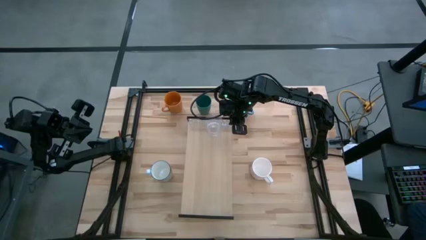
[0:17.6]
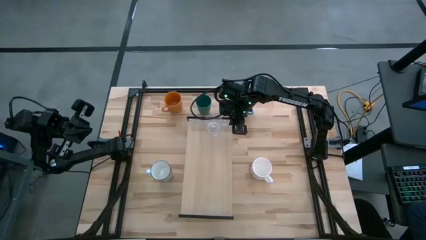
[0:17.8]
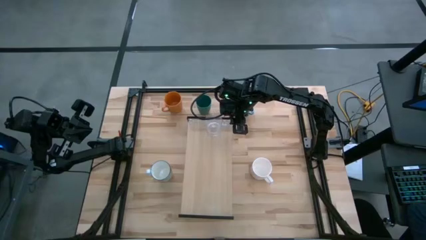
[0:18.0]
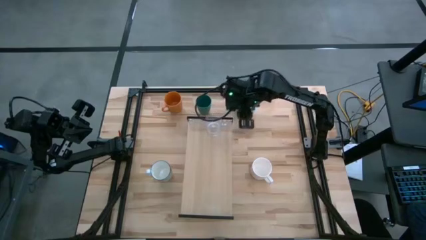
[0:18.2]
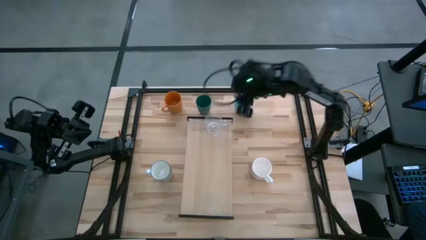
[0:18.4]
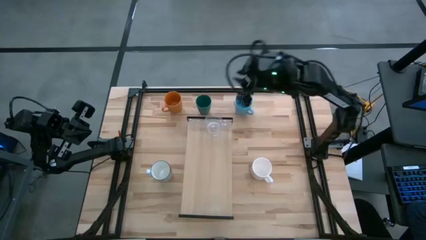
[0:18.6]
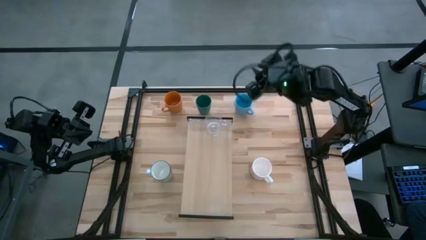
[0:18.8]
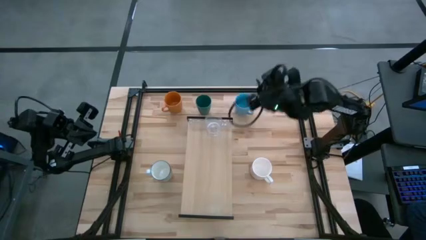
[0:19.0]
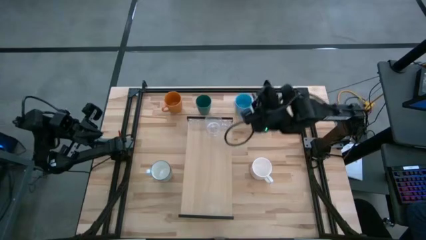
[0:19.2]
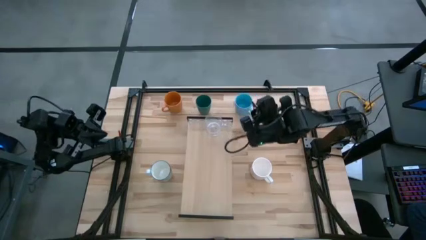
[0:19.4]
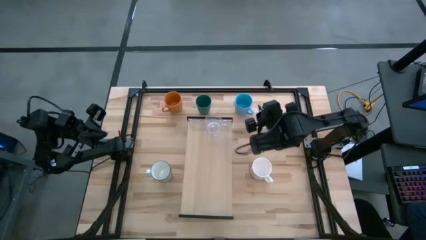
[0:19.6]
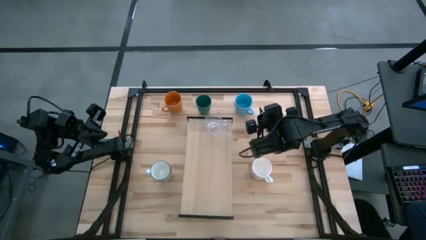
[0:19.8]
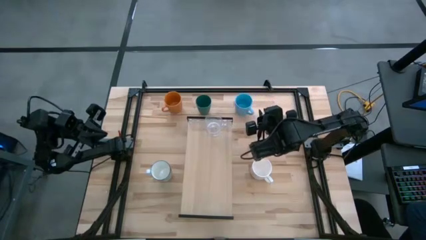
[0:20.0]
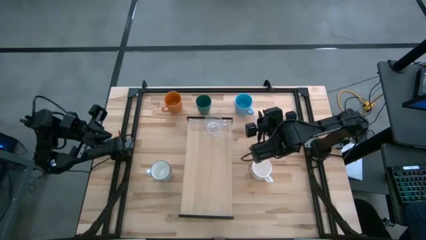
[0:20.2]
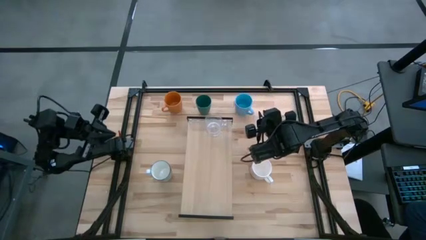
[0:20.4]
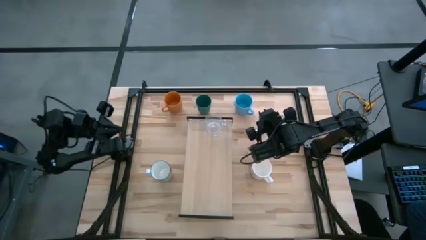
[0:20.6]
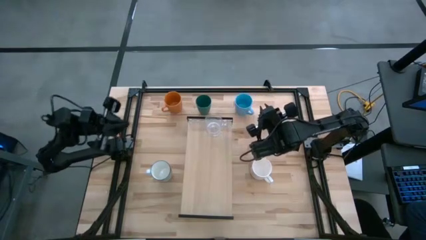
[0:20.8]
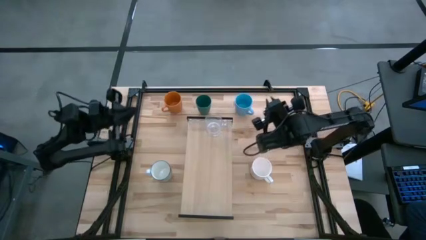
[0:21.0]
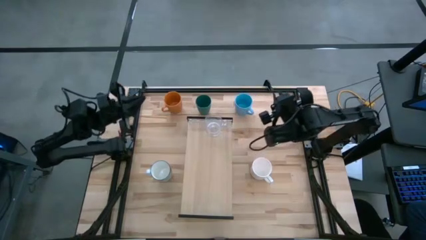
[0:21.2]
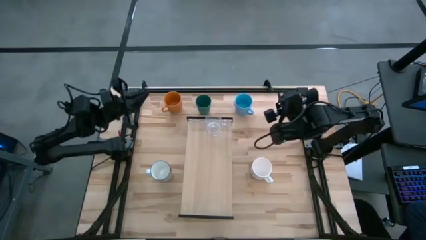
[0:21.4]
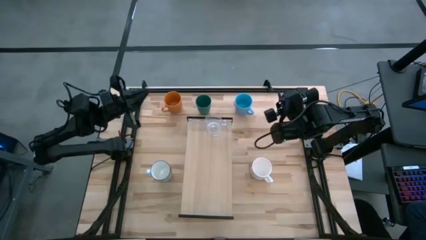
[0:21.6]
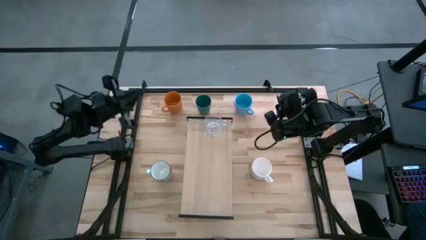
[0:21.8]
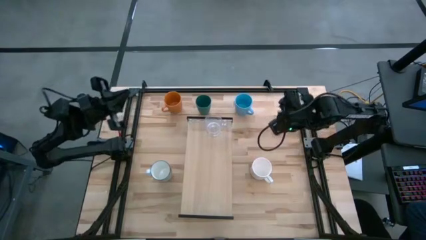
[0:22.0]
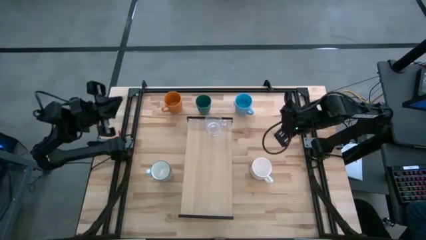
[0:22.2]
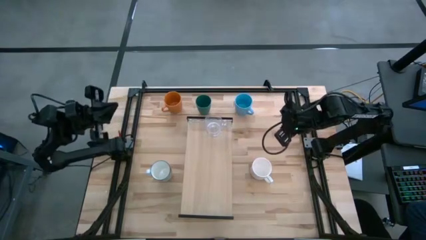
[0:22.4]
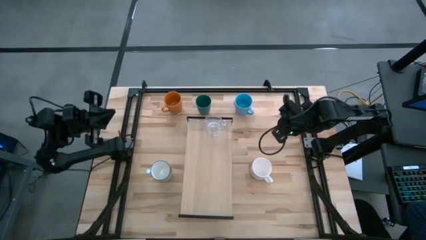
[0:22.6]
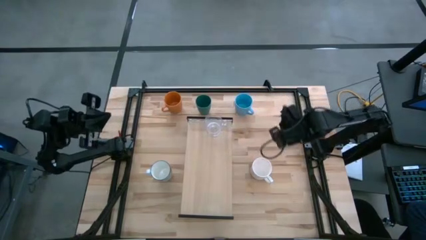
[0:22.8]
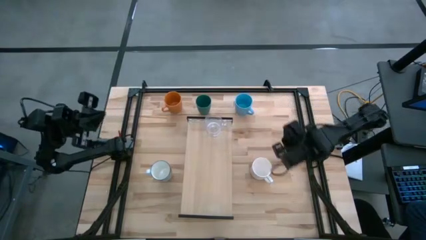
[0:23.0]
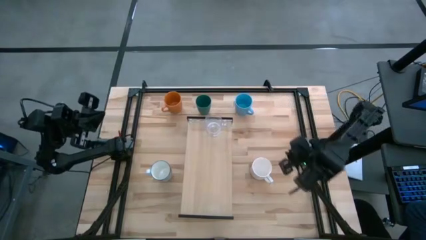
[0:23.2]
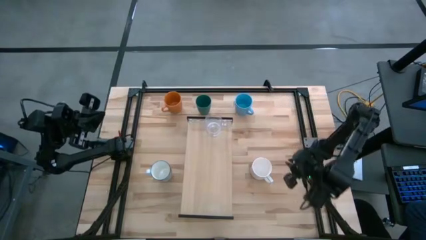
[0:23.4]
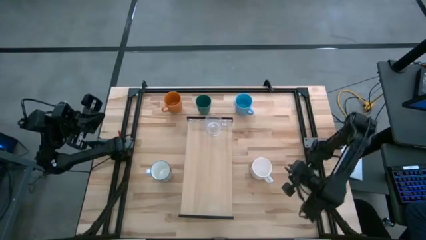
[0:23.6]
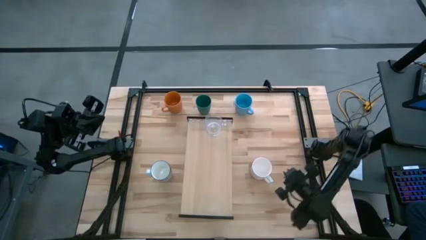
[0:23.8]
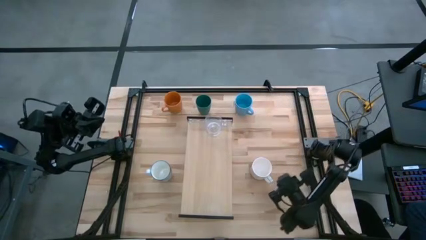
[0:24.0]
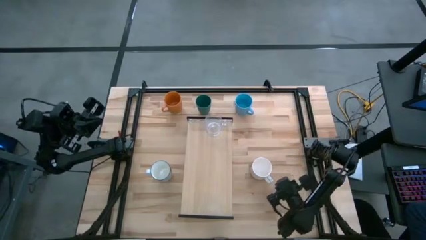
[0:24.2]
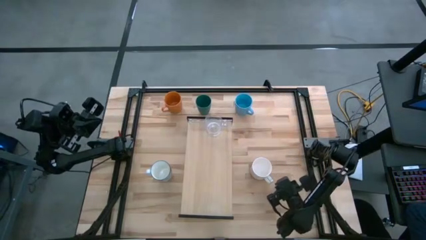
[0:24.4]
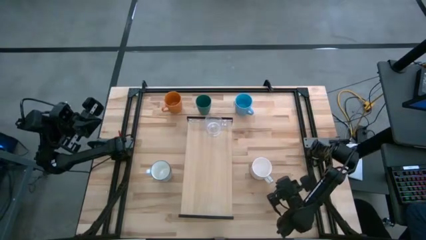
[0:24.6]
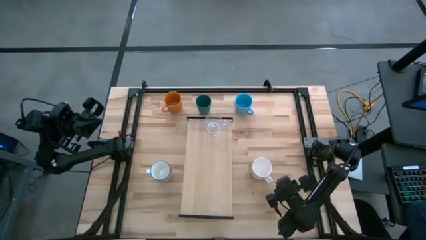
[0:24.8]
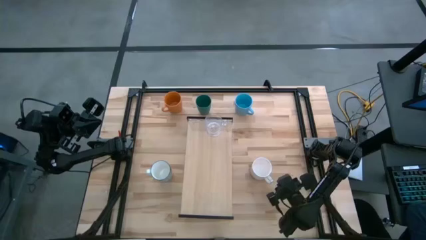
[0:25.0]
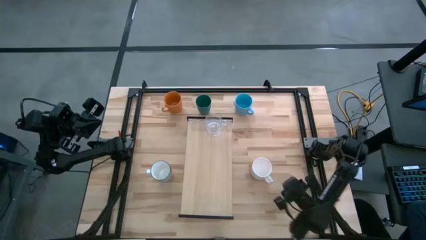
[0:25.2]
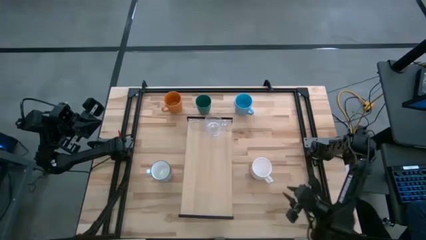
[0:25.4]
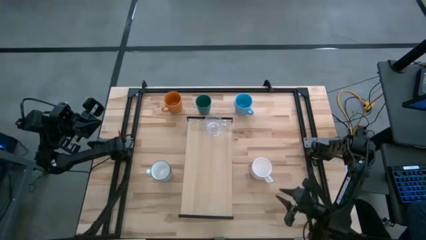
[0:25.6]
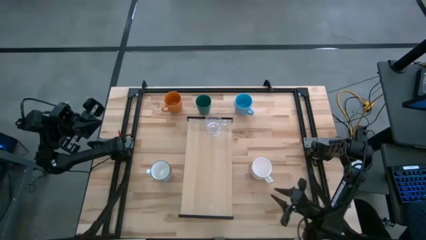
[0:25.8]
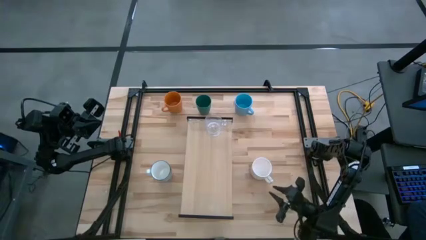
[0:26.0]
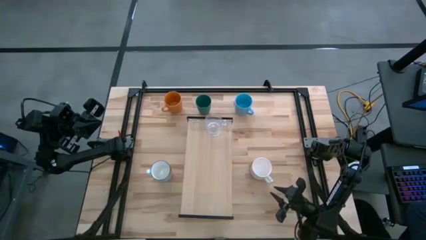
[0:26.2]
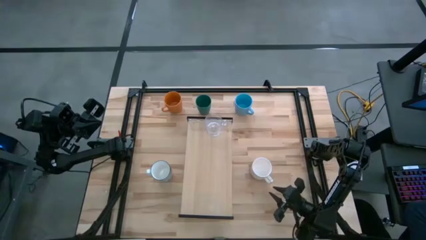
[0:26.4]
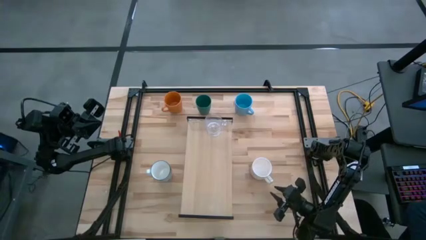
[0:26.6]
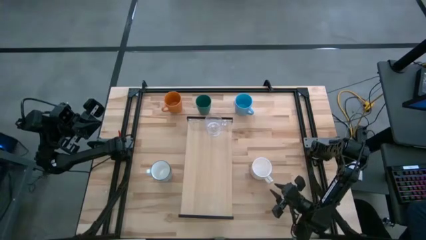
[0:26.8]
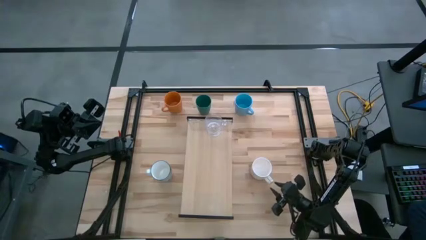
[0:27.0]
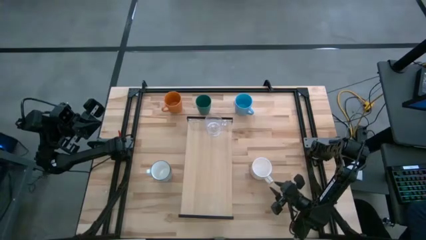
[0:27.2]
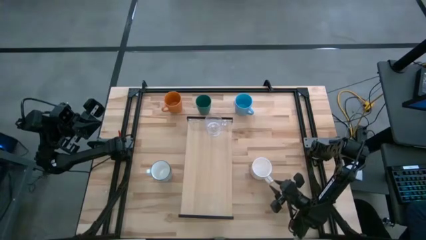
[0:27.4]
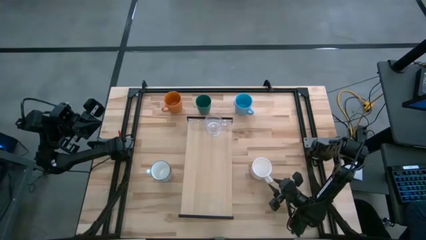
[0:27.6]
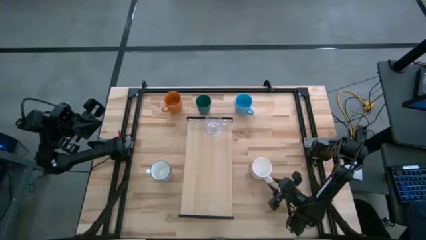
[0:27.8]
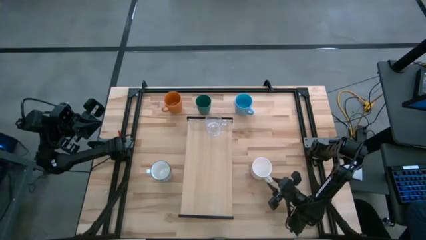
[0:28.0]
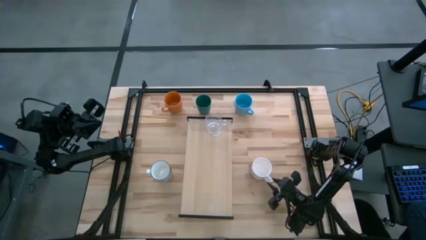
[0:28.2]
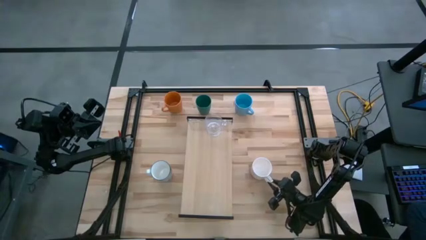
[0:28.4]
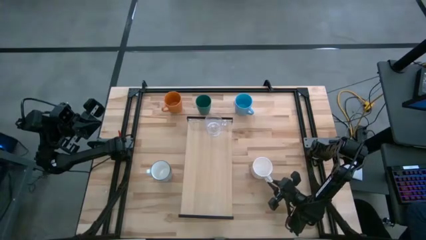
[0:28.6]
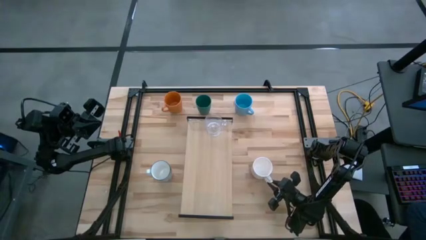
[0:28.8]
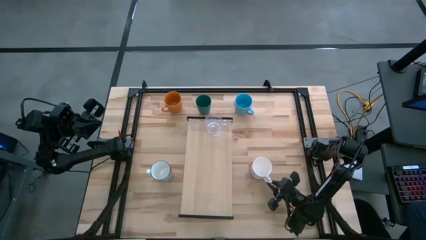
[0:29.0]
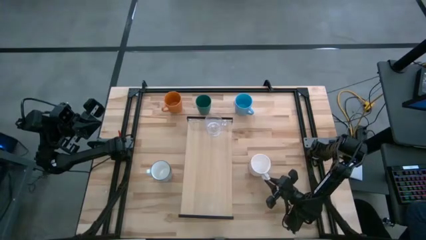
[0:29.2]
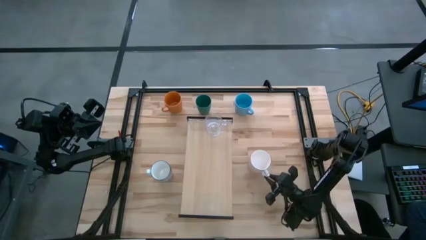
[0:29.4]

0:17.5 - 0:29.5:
Task: Stack small to large cups/mugs on shelf
Put the white mug on the shelf
